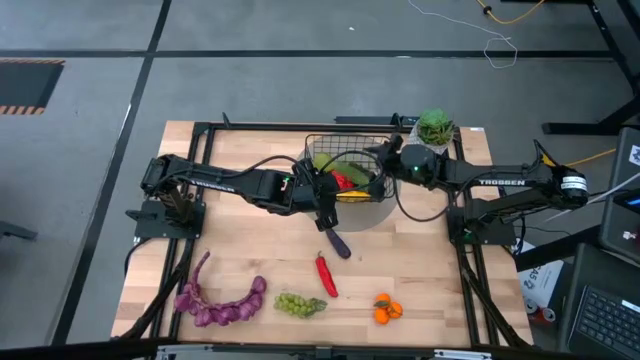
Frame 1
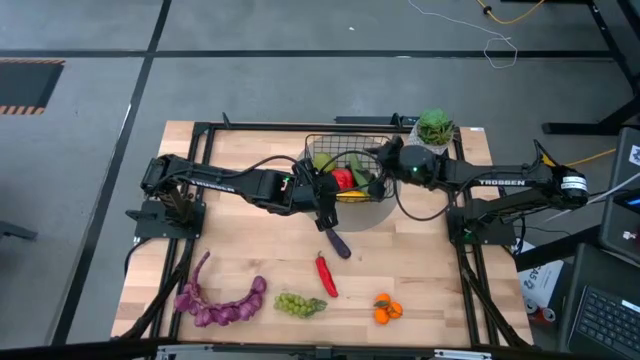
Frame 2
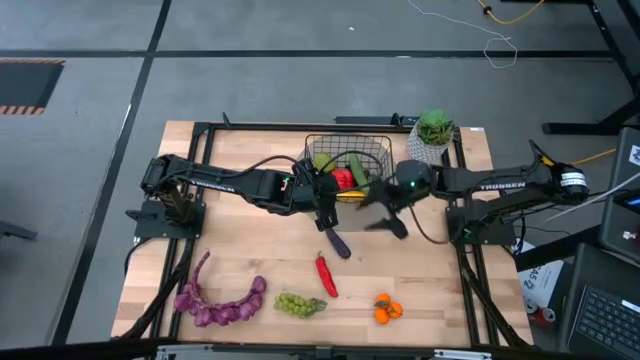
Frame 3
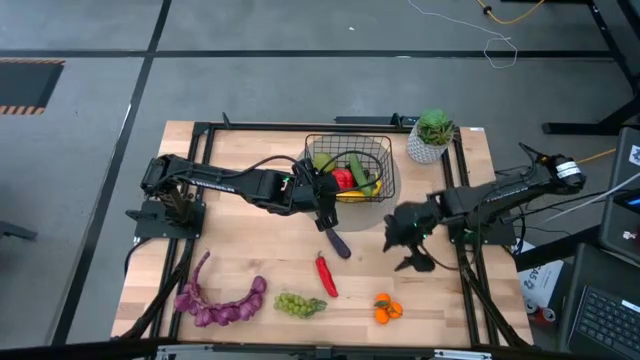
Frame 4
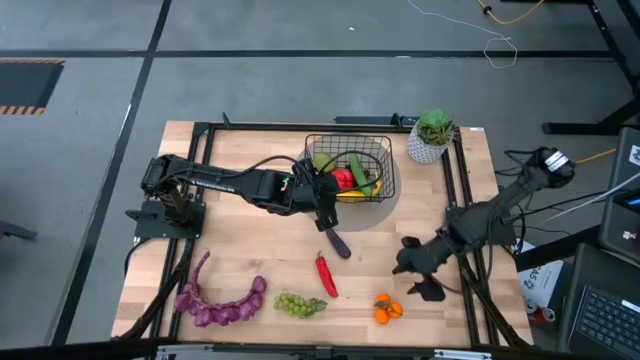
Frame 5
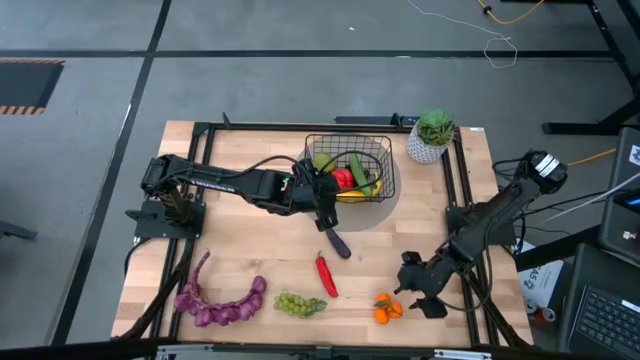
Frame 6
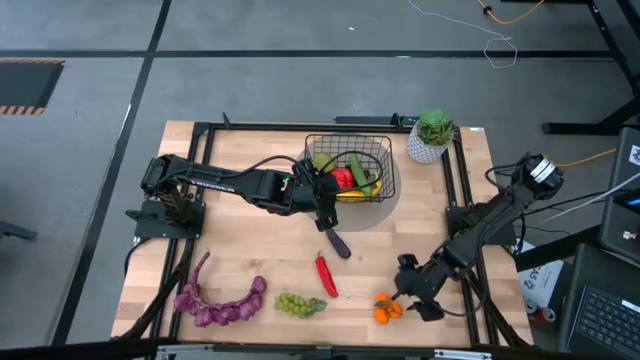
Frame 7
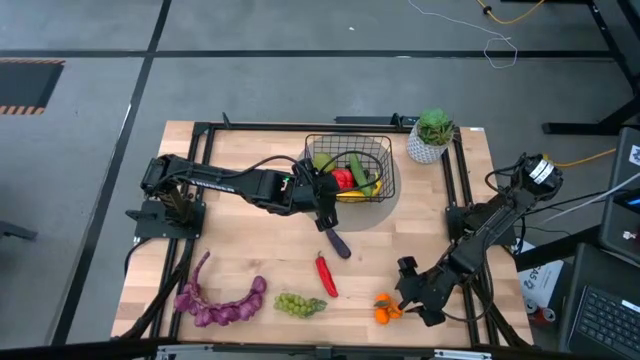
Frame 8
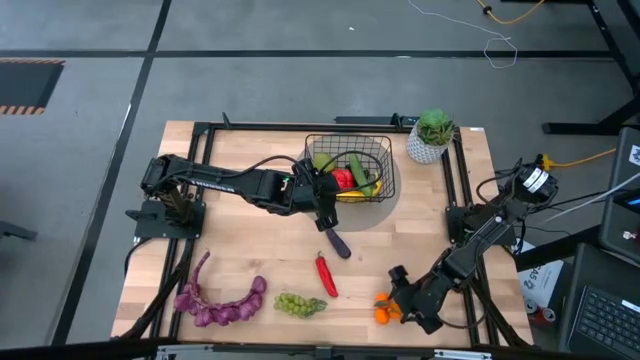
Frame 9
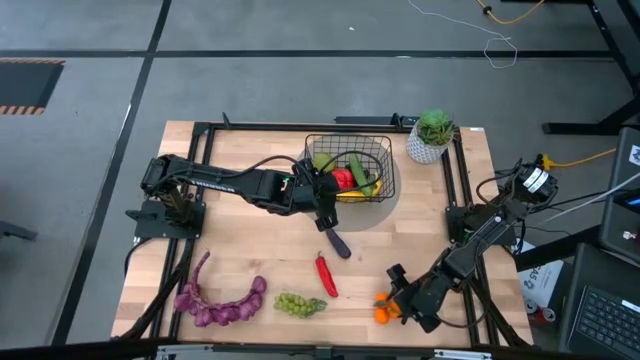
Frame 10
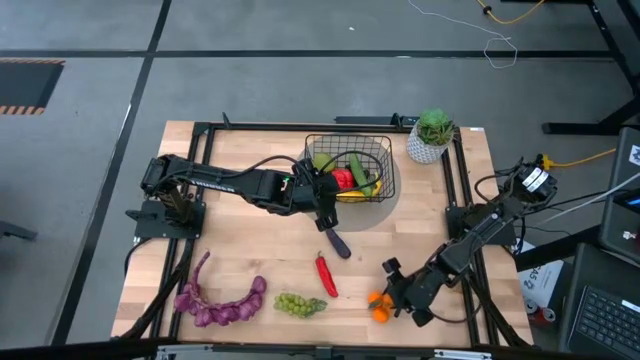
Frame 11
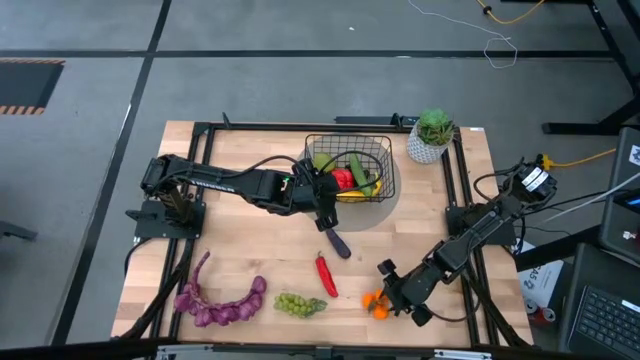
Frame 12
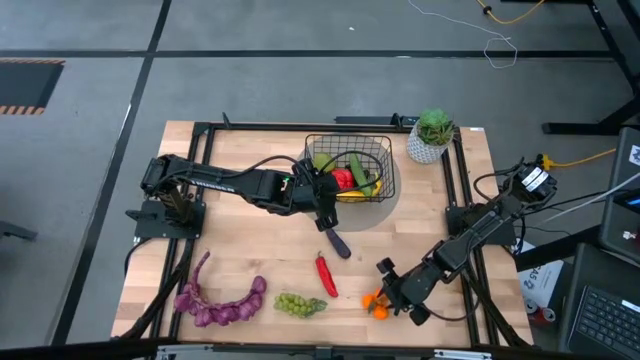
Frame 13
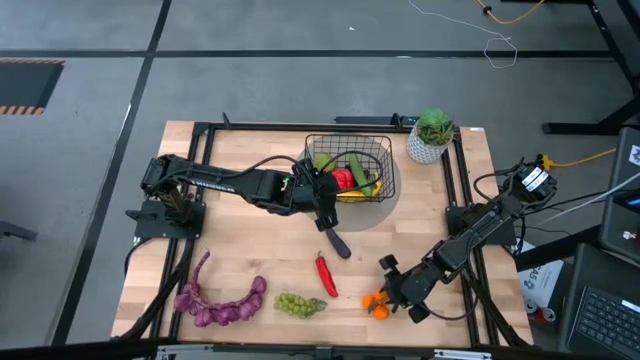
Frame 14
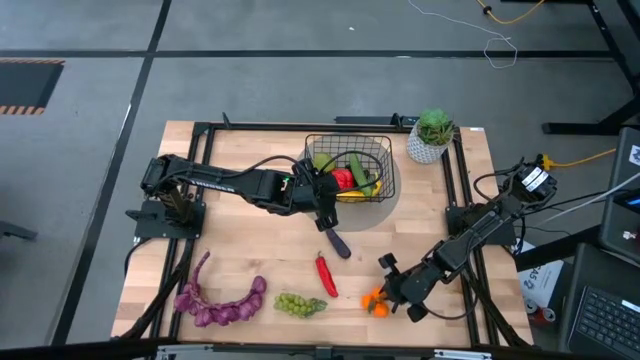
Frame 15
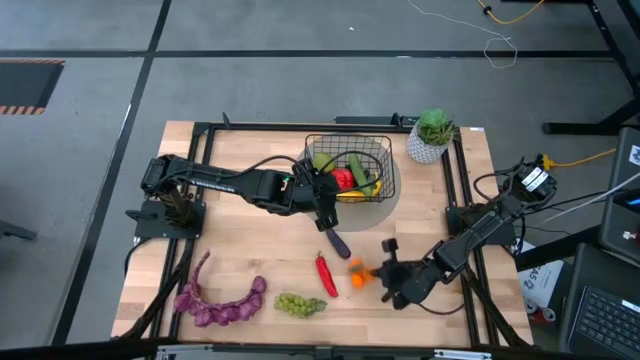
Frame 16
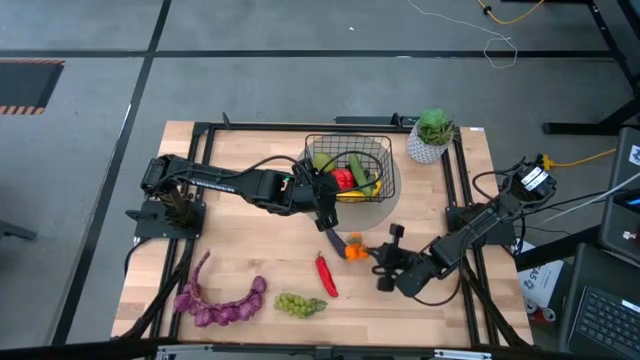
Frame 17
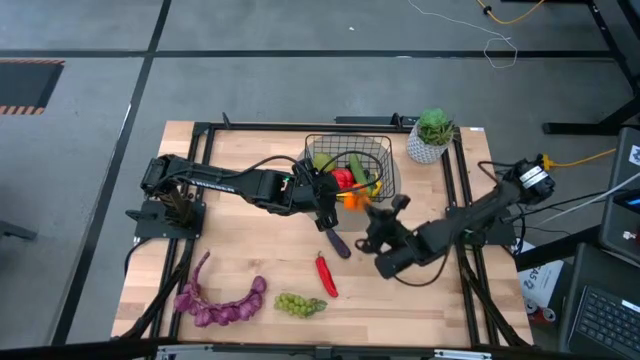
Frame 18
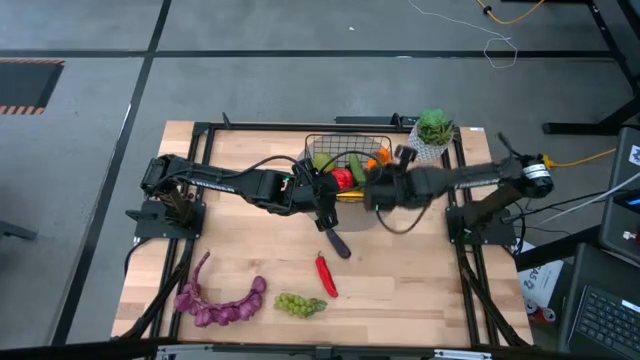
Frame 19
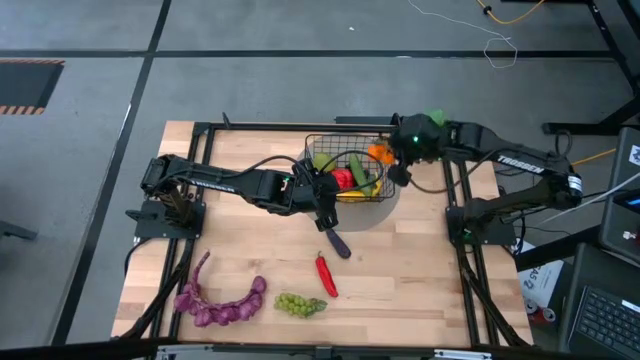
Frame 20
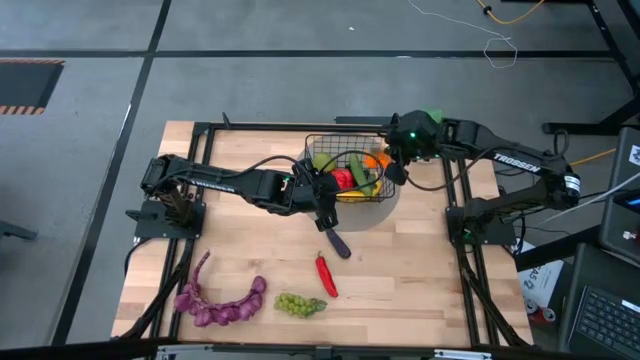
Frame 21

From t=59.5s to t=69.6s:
Task: Build produce basket
Put the orange tangerines into the black wire basket

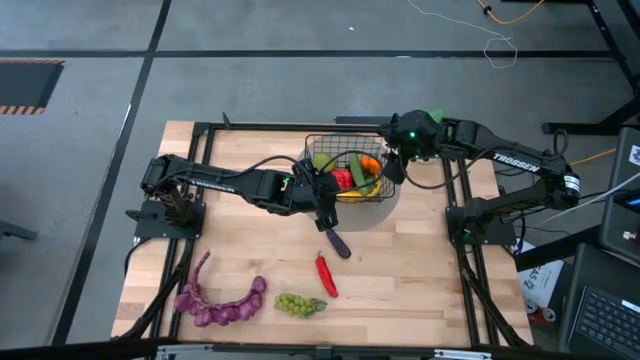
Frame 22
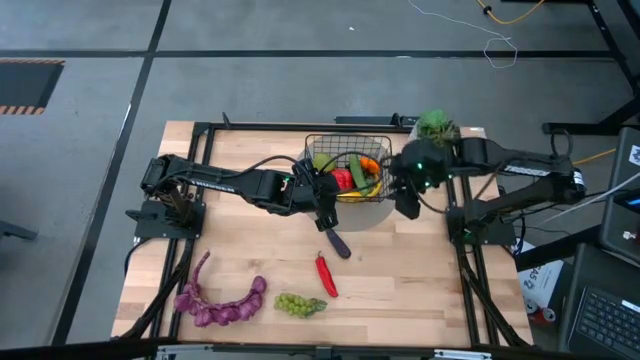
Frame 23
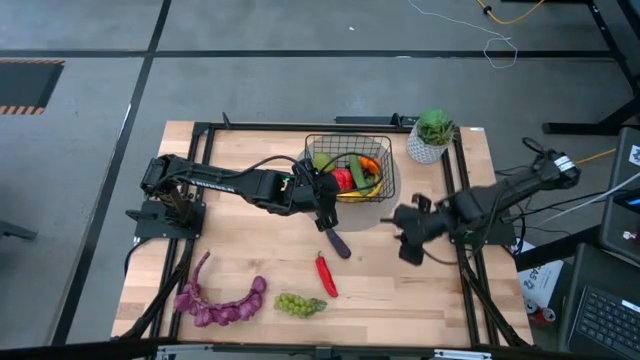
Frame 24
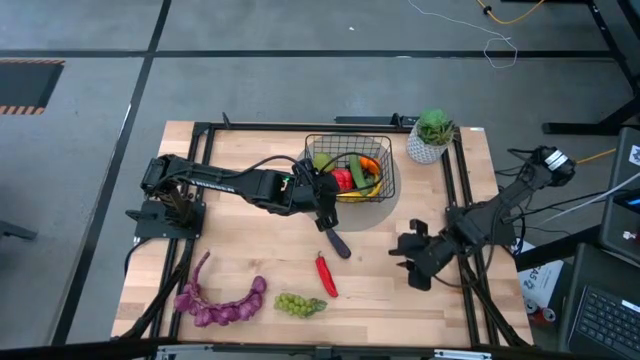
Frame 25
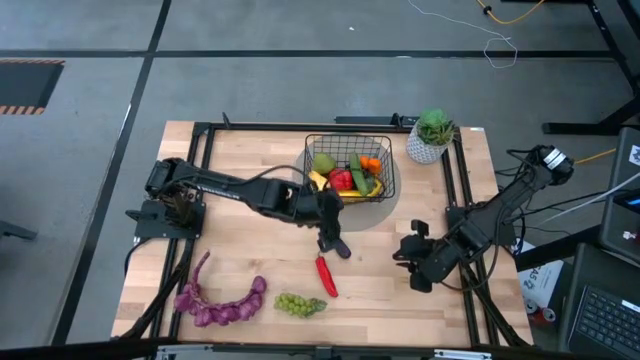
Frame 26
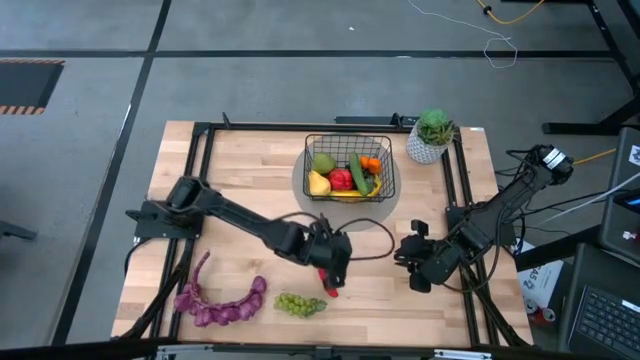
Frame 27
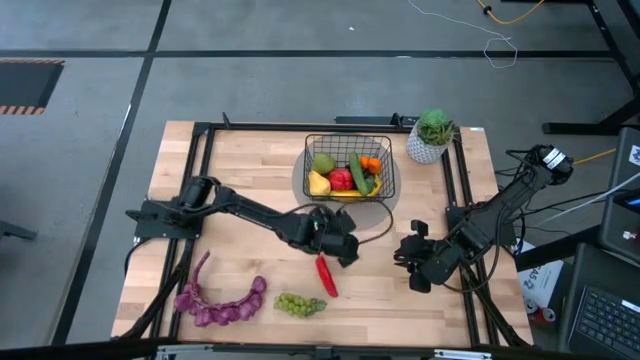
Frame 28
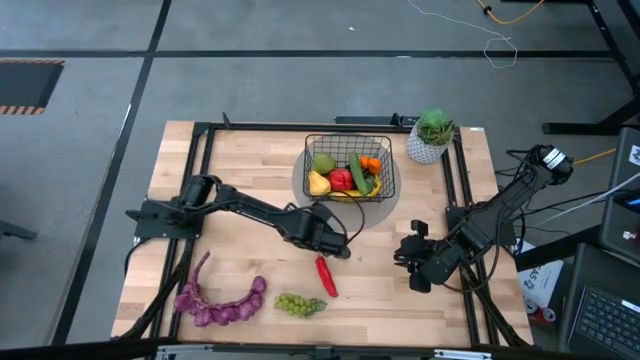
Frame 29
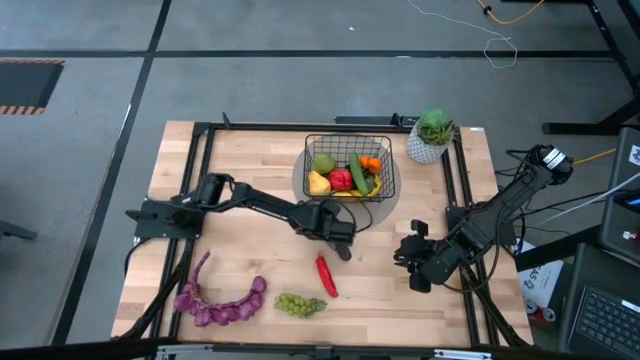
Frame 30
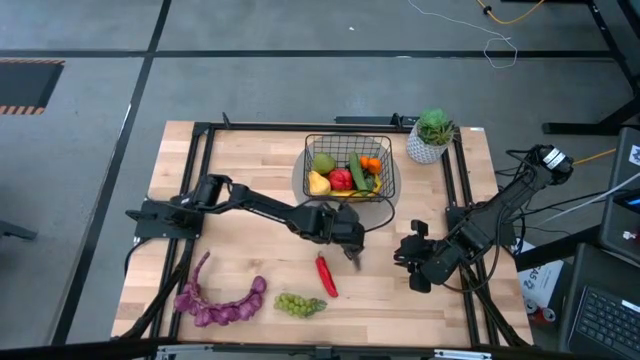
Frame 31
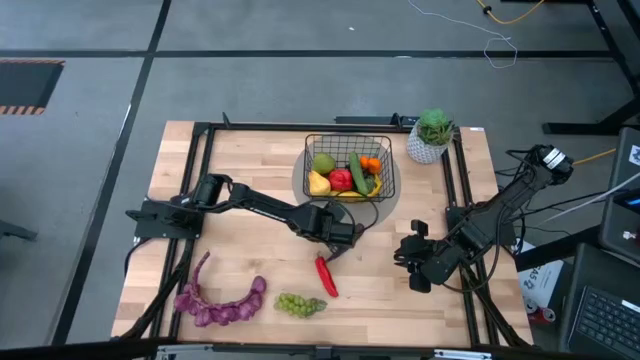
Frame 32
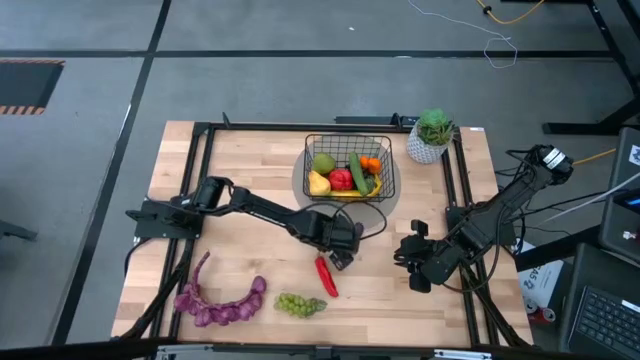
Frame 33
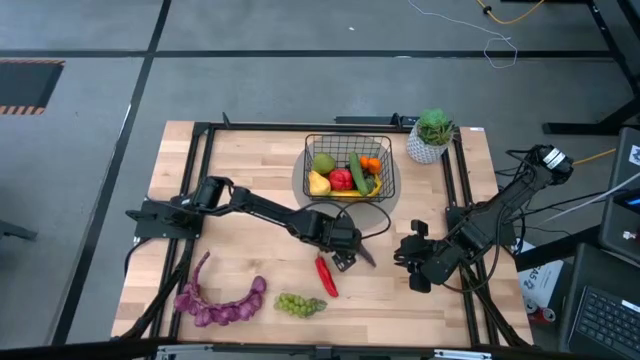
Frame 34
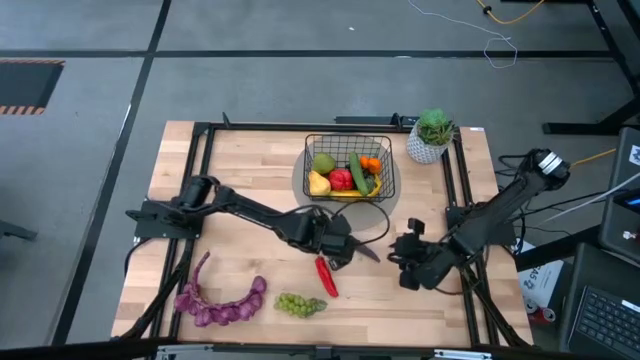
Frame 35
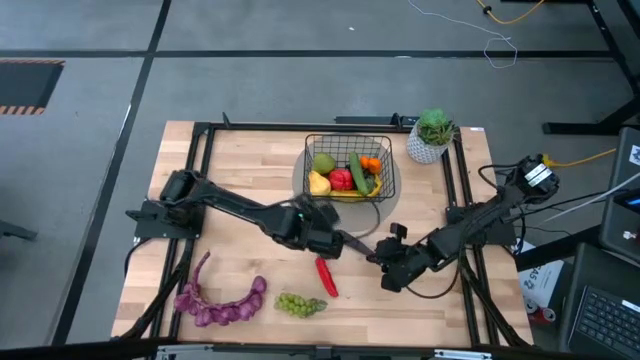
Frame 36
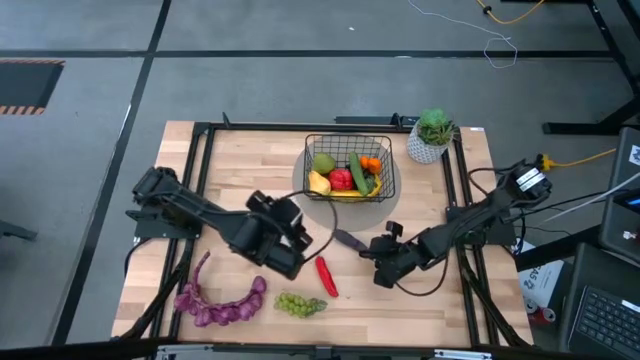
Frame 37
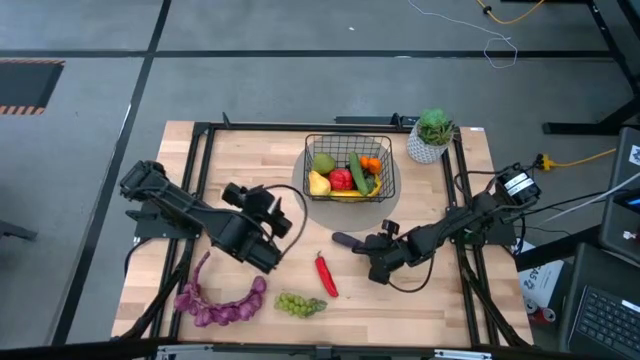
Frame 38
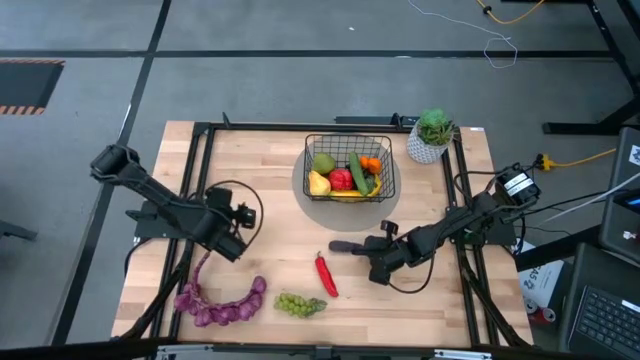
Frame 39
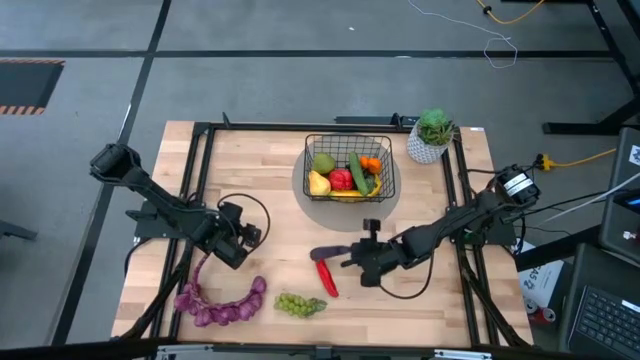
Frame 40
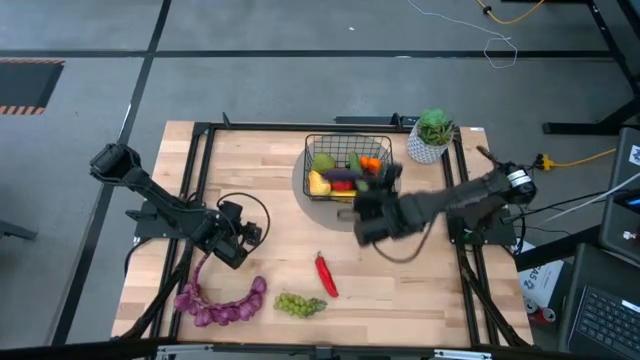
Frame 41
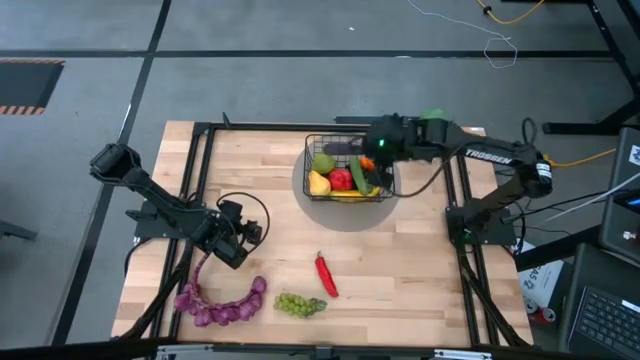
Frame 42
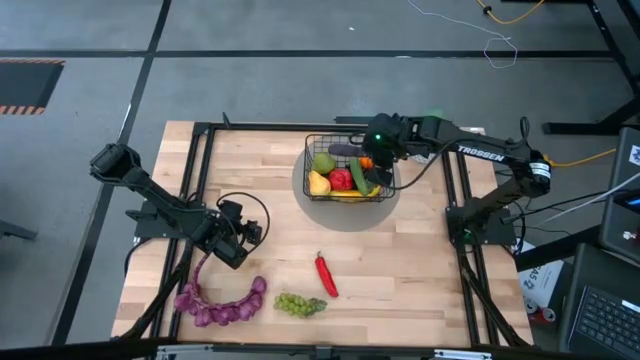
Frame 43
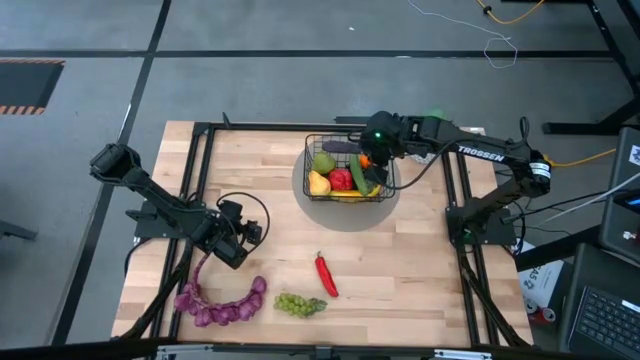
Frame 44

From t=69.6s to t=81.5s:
Put the violet eggplant into the black wire basket
